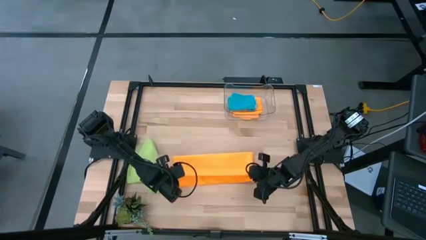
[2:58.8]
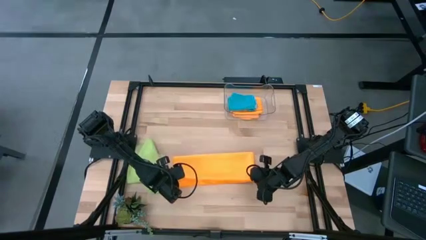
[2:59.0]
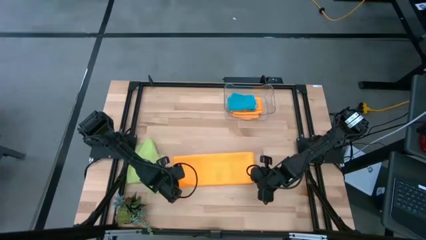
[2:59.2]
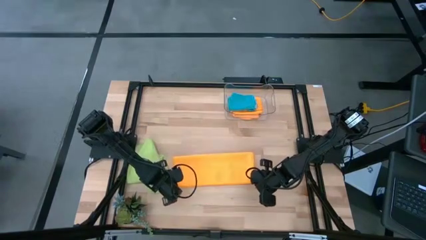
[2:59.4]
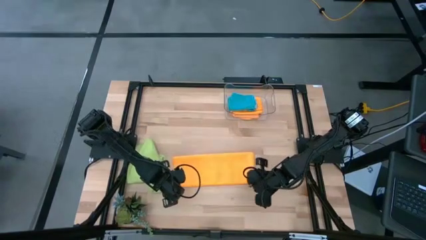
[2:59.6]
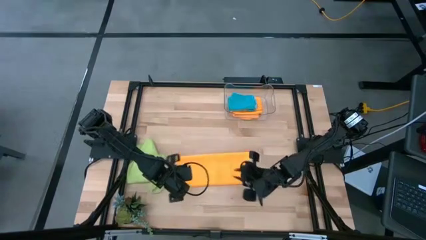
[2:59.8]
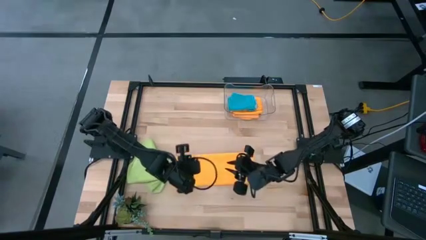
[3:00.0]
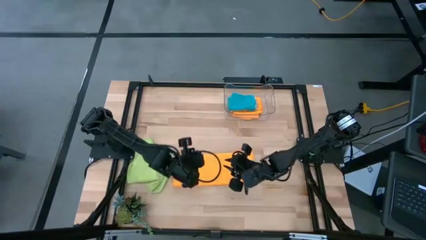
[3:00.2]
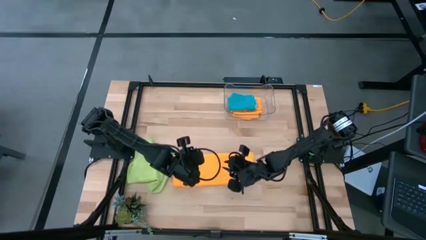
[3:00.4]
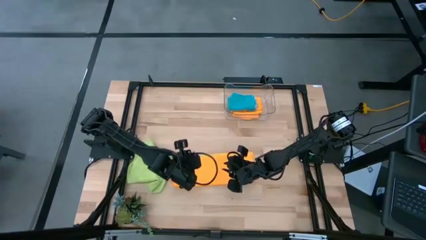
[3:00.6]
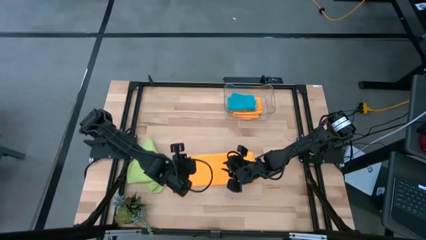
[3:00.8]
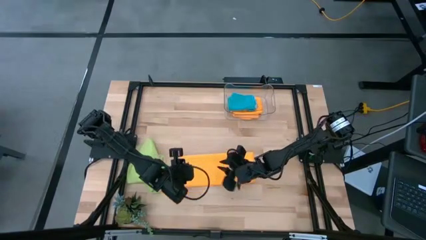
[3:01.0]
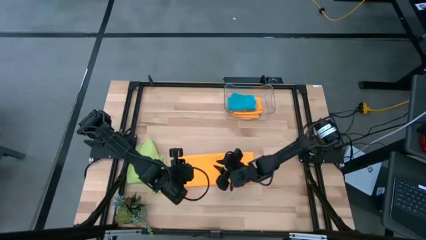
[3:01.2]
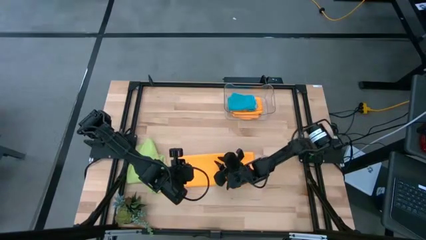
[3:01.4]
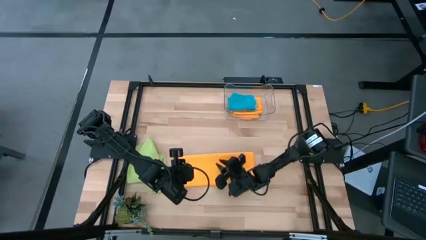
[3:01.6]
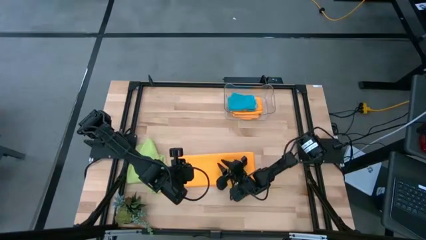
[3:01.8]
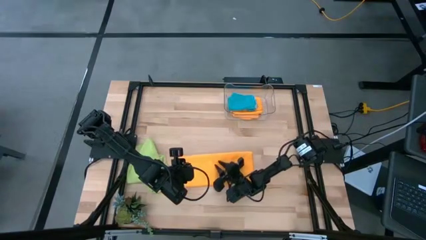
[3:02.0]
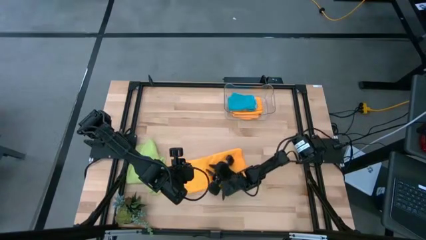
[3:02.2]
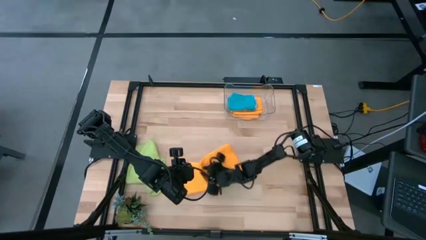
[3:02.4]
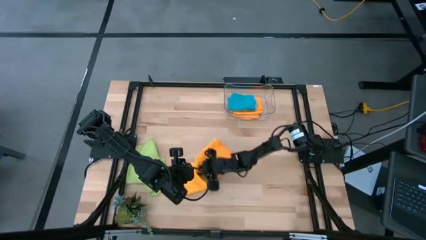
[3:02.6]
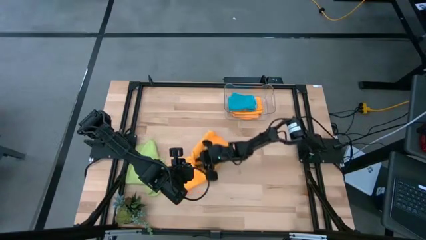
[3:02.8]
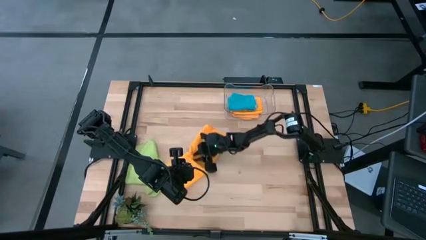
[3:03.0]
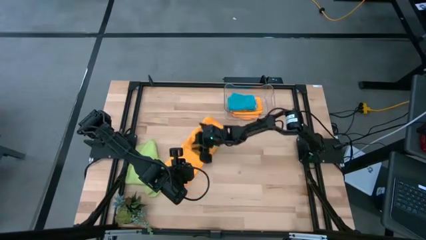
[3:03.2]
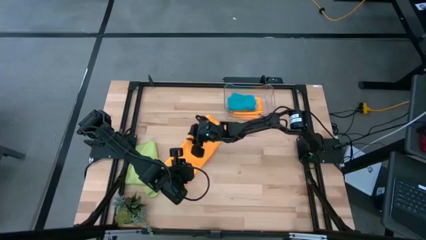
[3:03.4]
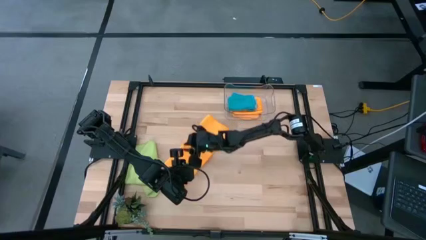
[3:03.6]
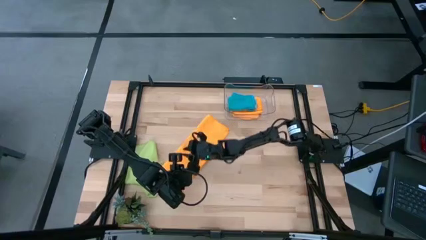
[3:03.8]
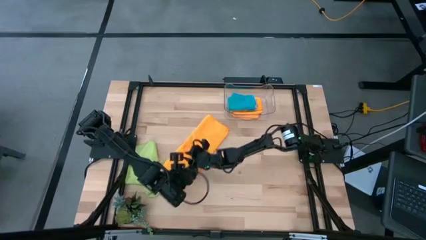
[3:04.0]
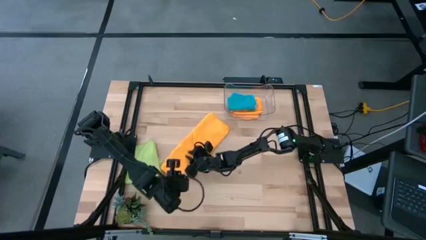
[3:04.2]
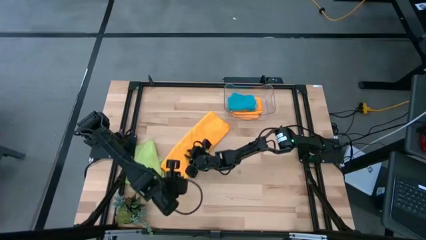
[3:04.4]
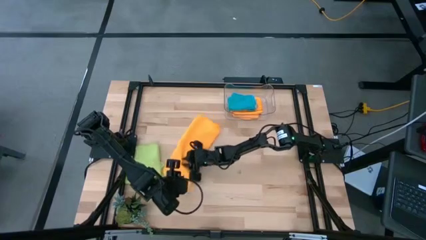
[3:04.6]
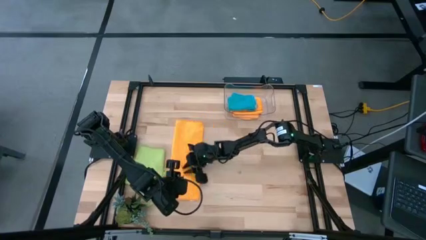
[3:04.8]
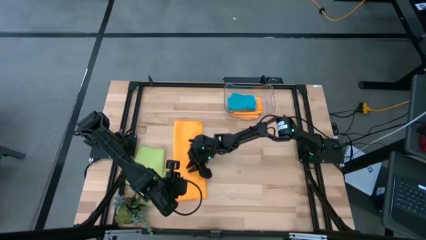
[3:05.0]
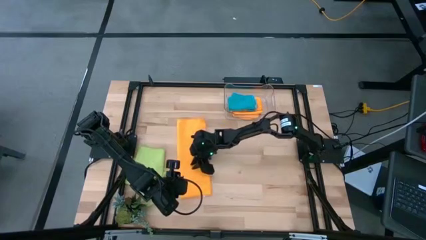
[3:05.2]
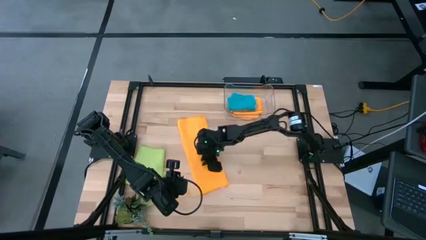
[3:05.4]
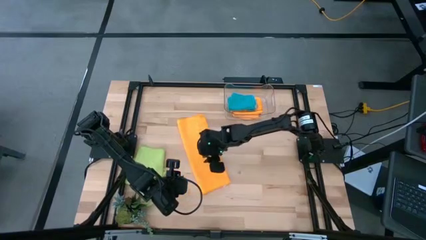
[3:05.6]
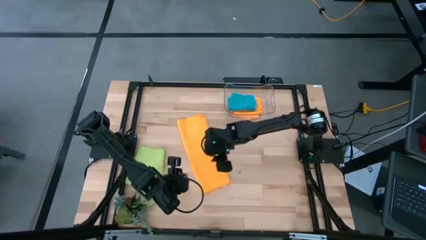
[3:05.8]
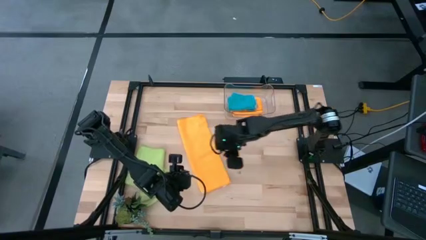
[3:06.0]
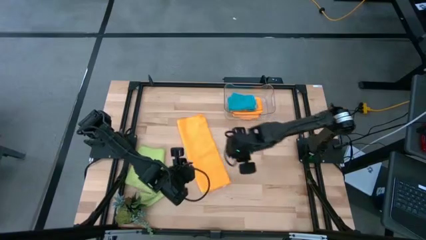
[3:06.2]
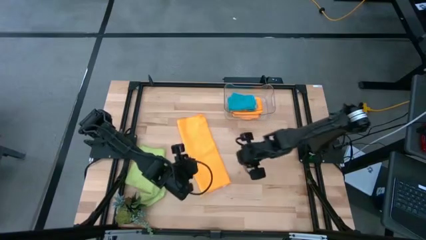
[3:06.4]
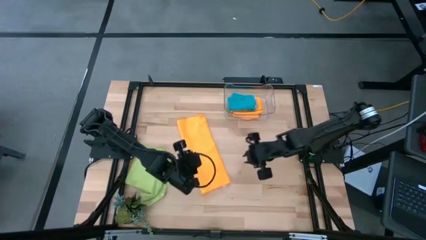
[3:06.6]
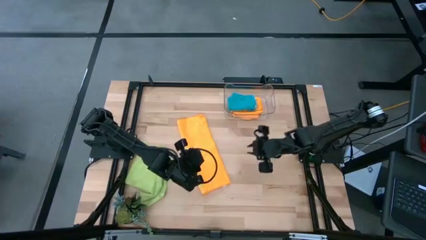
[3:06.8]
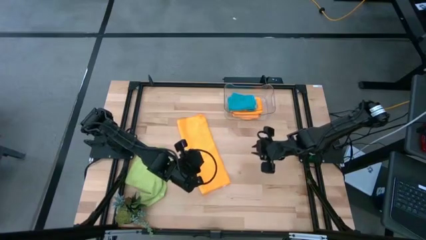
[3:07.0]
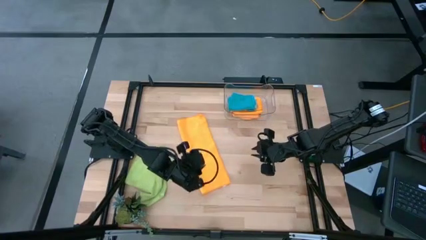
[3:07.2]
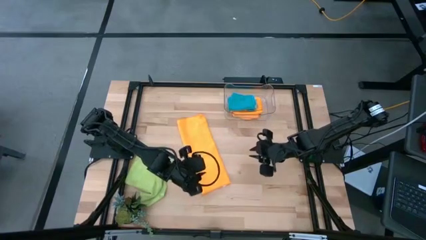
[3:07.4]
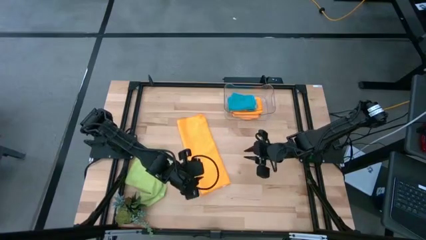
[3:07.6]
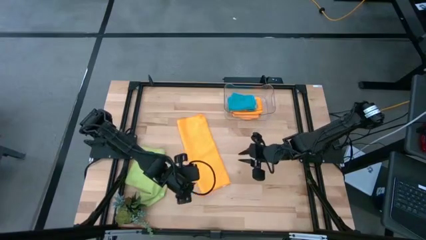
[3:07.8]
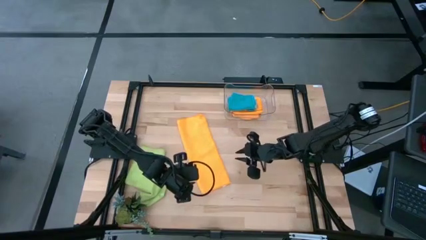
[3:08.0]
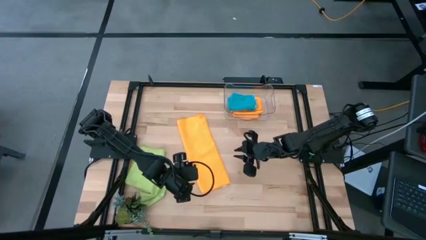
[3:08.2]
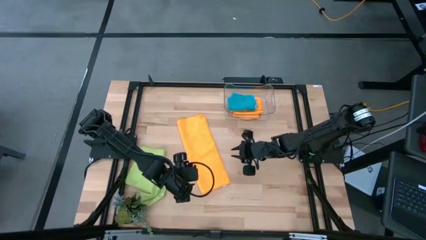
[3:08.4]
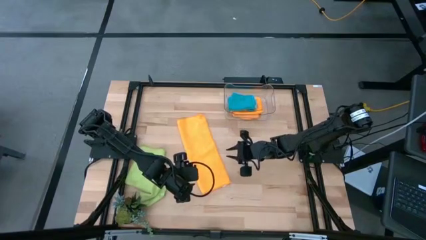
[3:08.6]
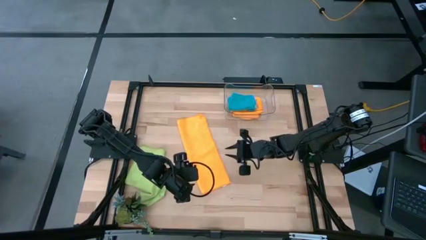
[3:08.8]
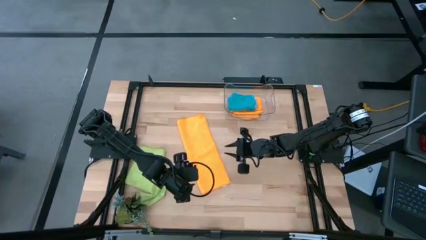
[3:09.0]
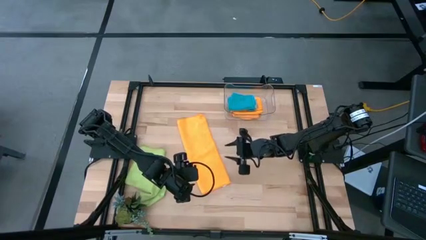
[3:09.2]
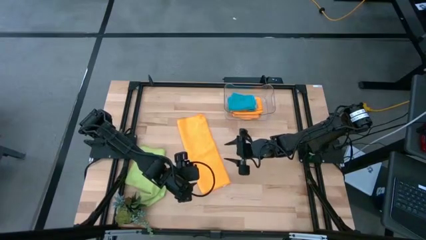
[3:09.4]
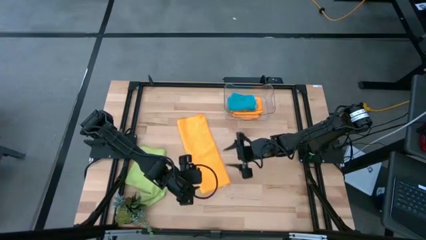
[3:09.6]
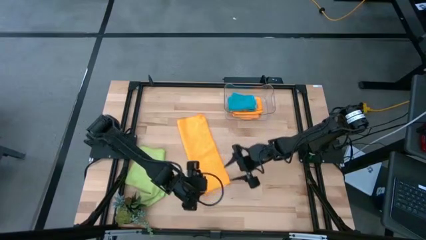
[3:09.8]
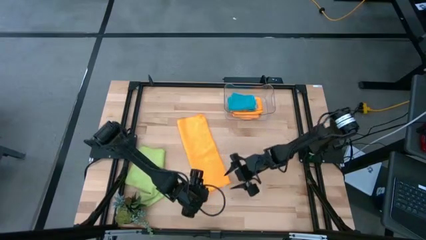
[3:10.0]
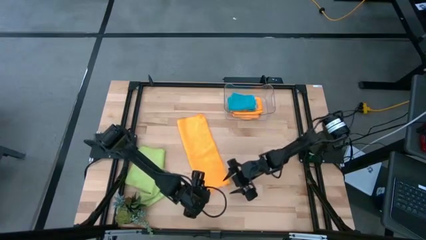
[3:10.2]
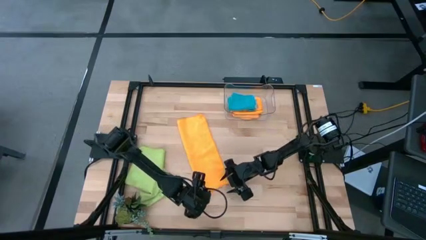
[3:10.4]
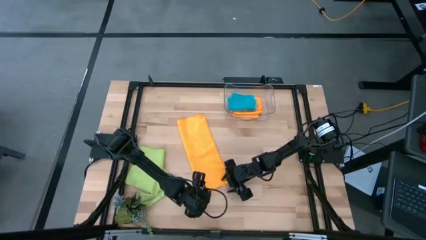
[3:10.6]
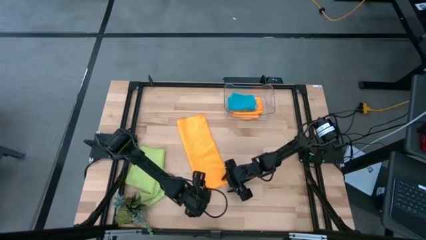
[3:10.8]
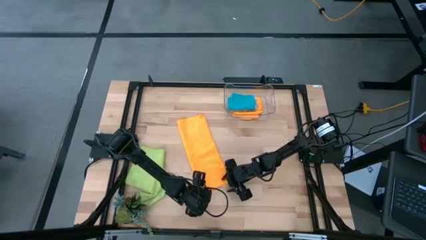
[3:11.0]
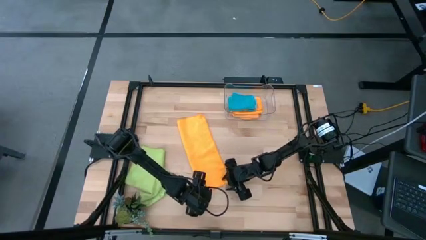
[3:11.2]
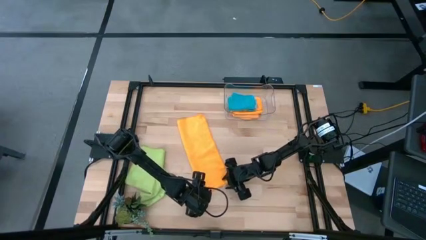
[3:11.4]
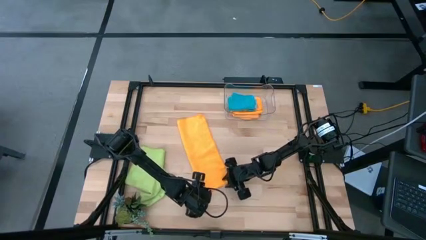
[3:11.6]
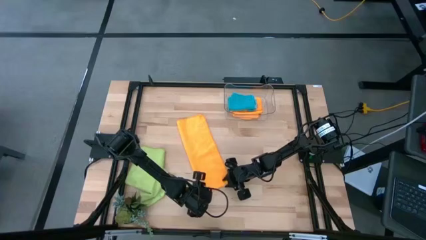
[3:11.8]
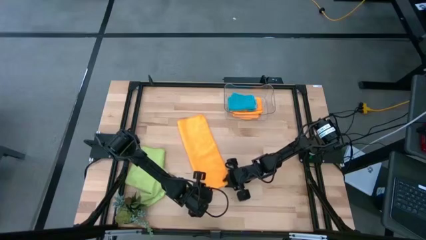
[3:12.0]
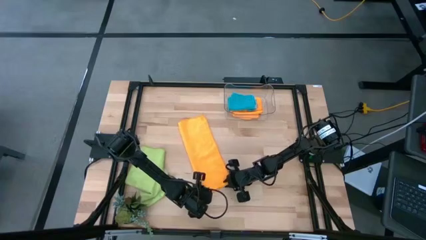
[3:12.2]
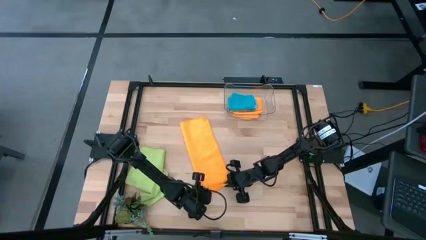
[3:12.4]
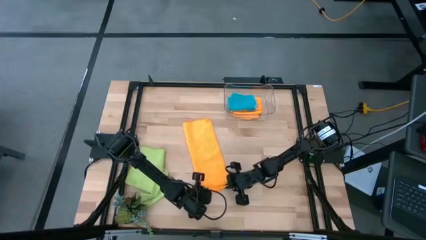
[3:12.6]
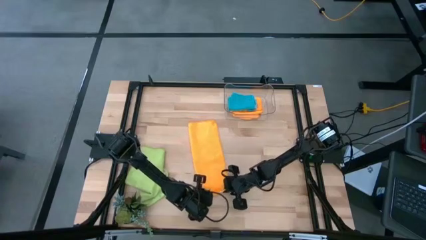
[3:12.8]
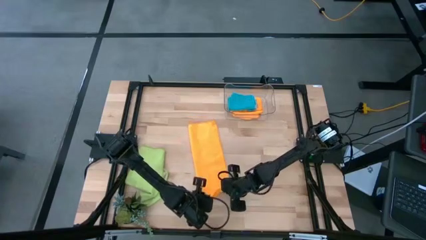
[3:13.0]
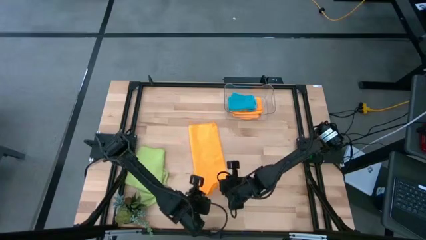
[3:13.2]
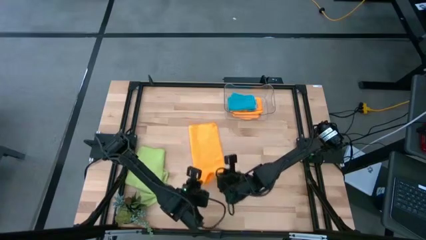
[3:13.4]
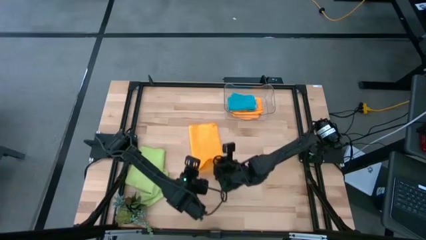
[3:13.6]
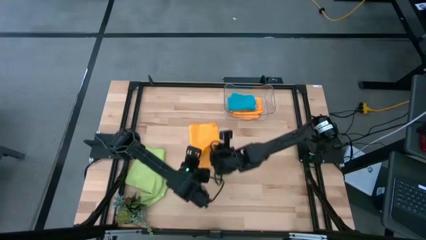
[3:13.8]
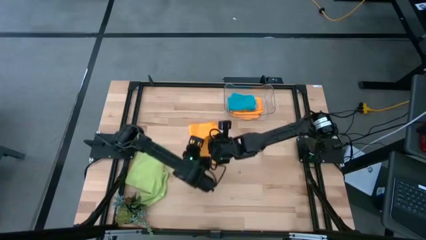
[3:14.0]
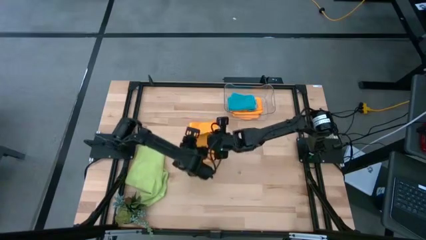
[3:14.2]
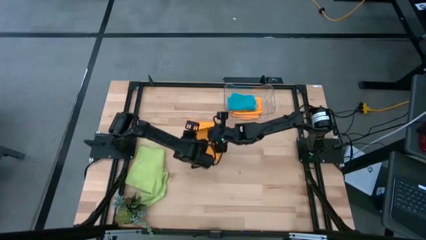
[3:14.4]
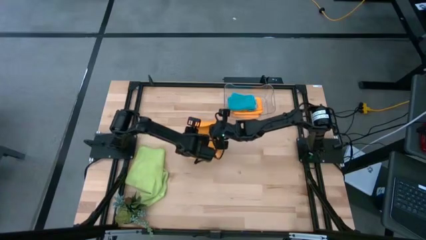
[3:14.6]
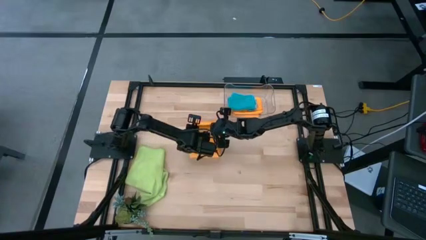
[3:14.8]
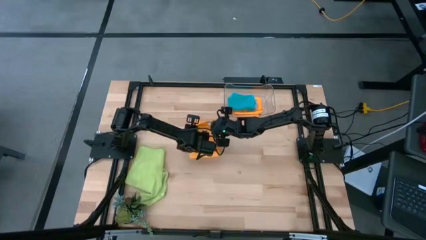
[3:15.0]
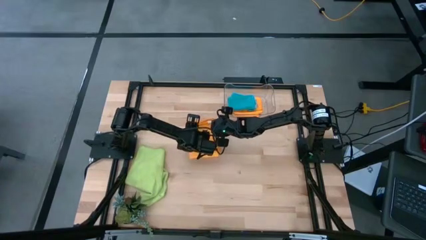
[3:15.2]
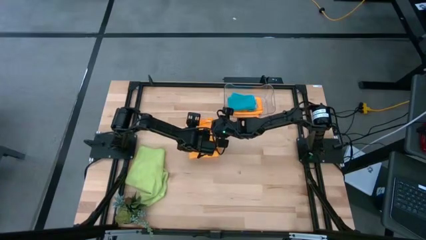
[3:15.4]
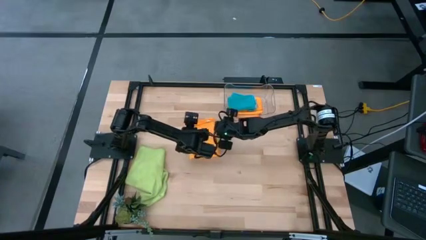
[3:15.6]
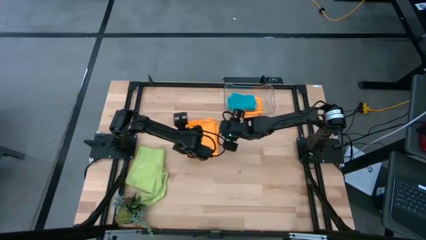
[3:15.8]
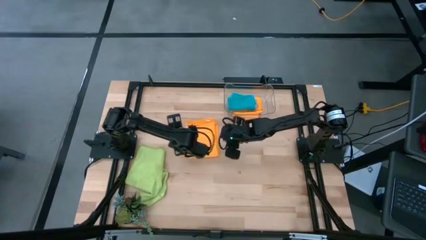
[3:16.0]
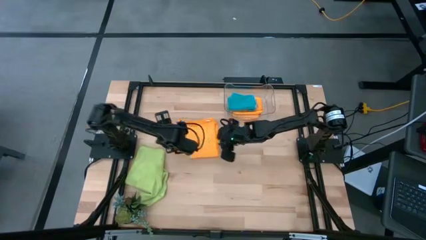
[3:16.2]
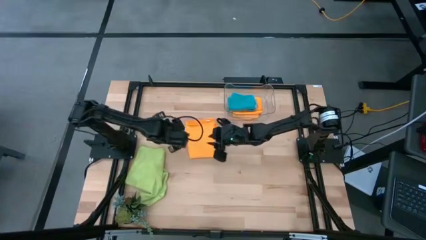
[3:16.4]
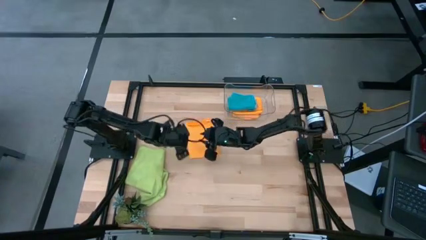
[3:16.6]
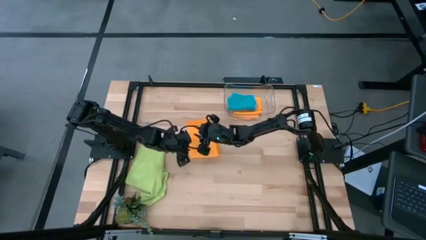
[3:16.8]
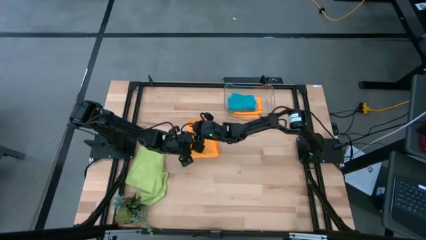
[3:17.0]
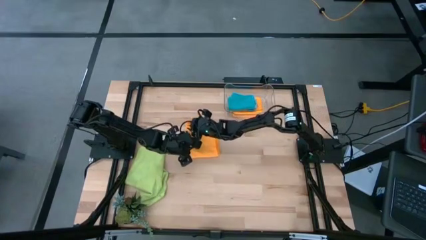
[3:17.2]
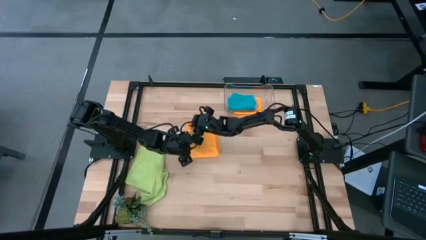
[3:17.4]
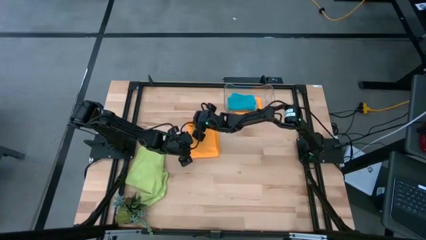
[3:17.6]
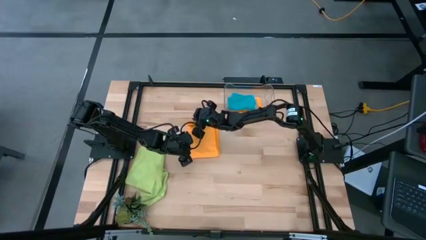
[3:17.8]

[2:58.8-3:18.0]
Task: Fold microfiber towels
Fold the orange microfiber towel
